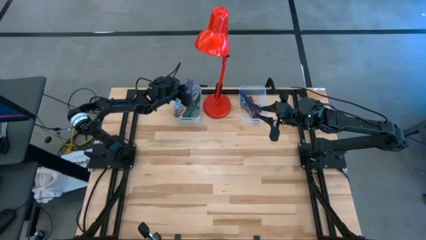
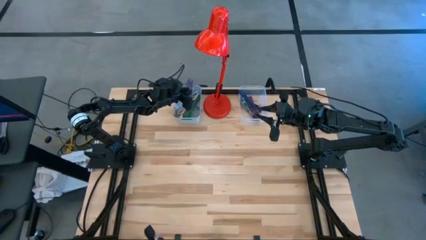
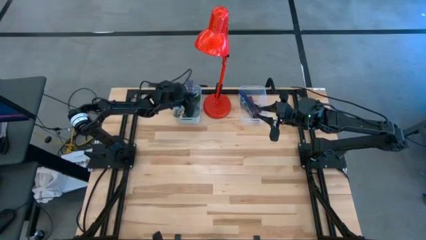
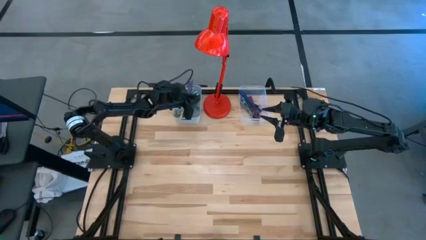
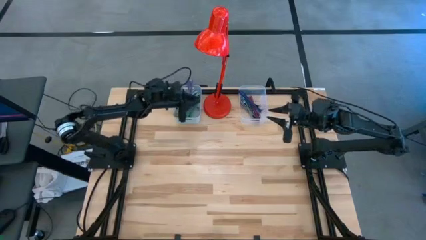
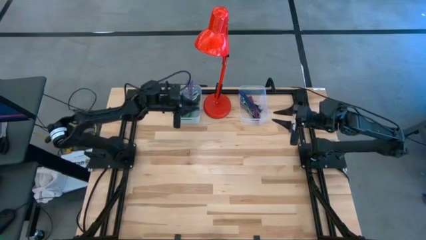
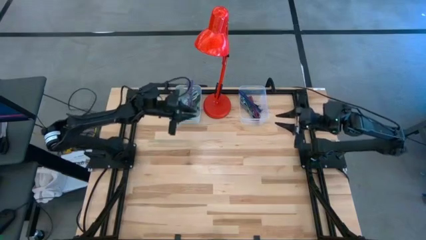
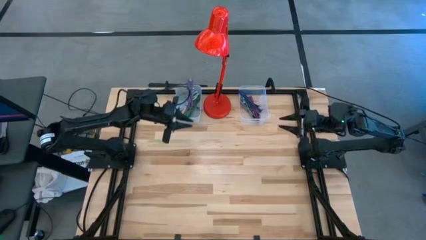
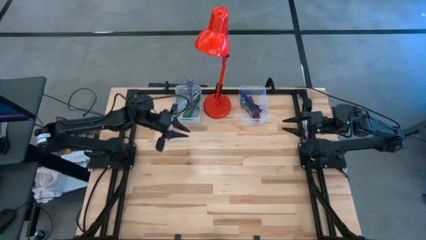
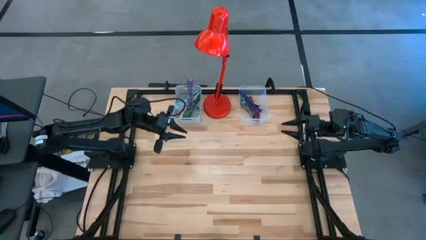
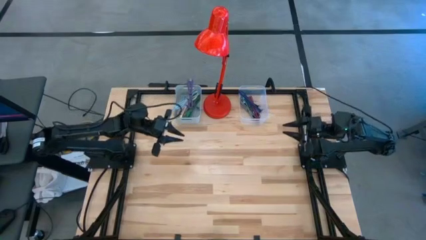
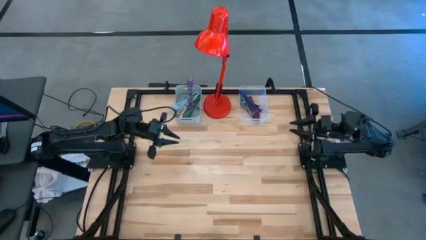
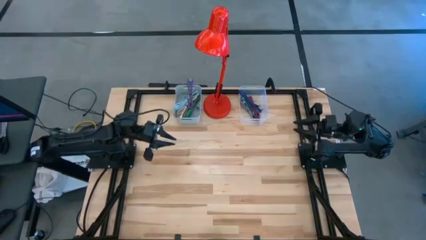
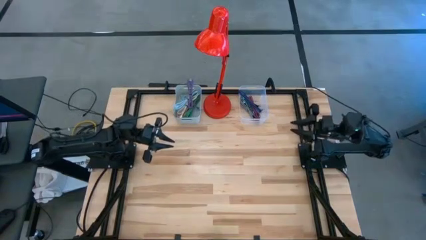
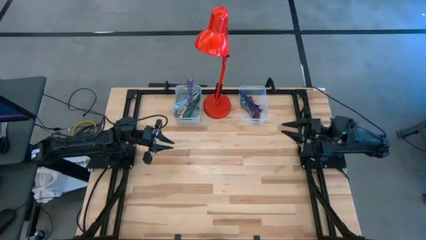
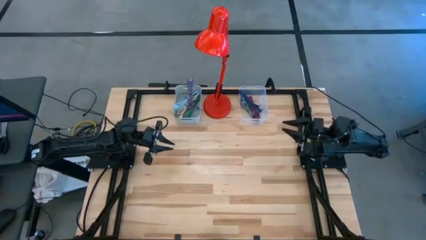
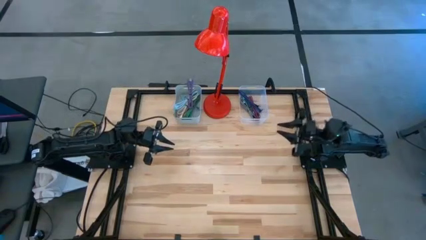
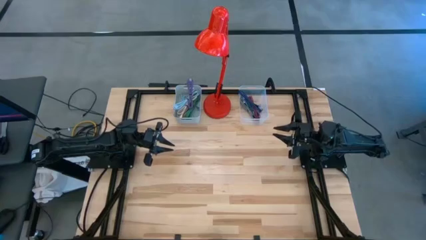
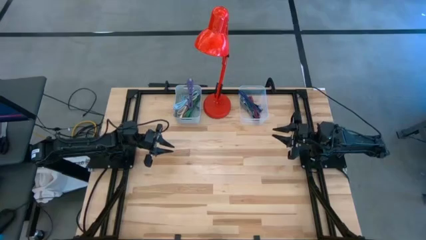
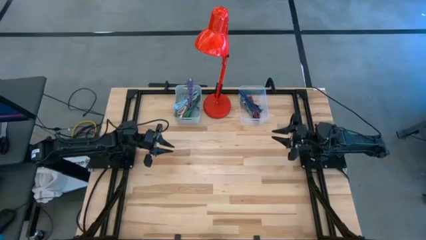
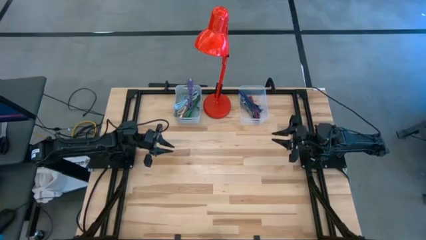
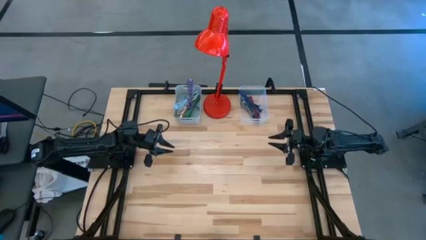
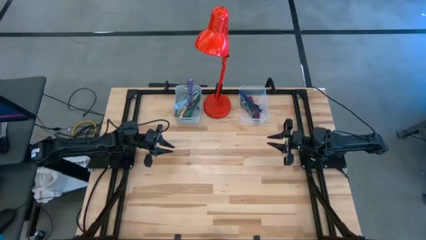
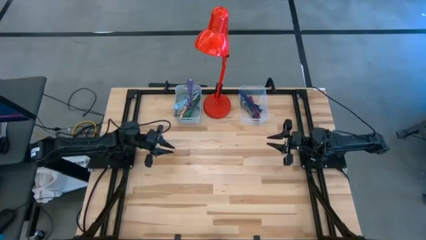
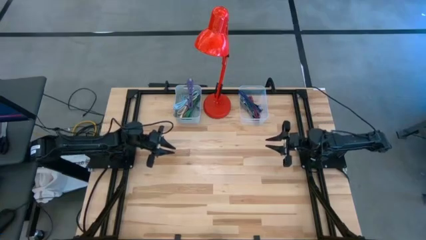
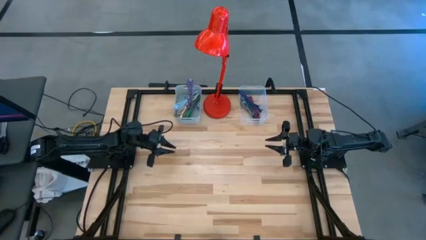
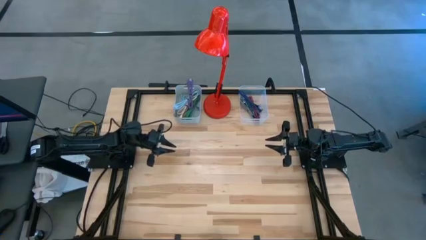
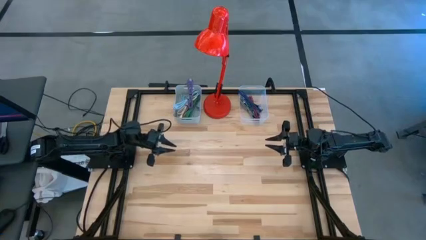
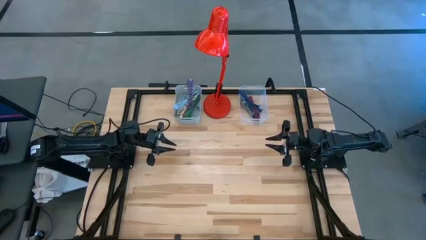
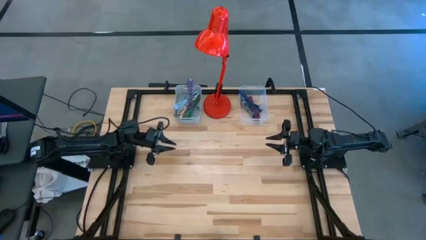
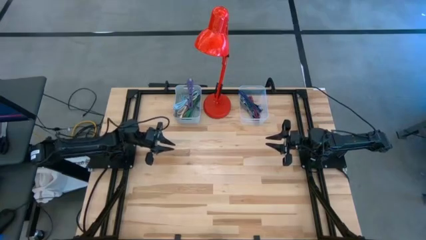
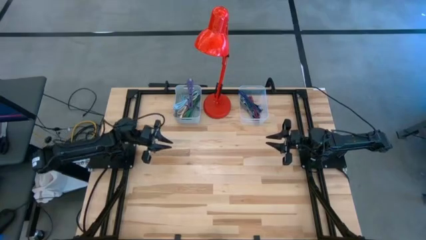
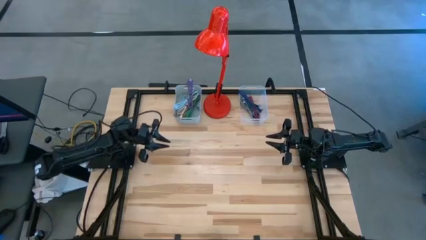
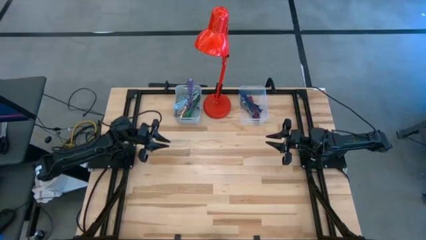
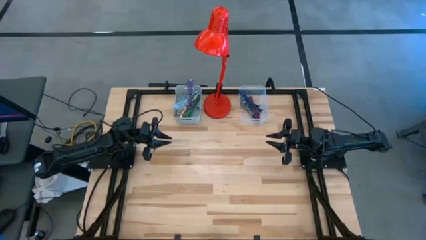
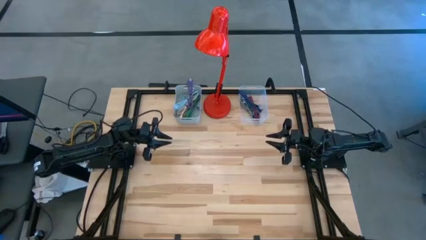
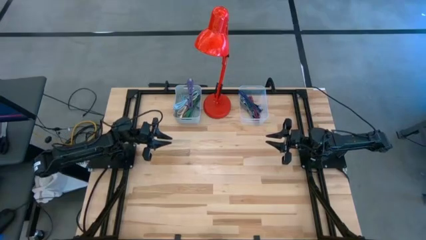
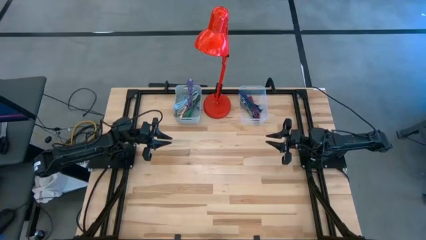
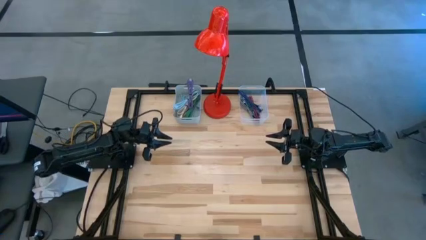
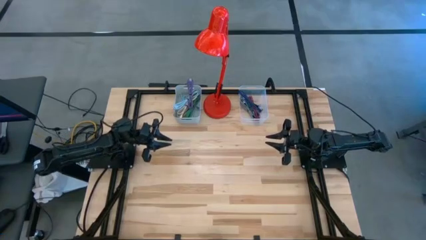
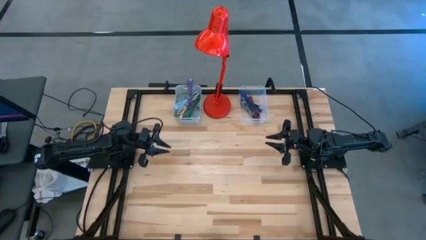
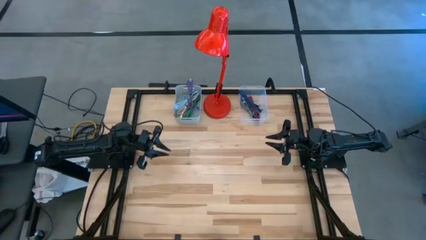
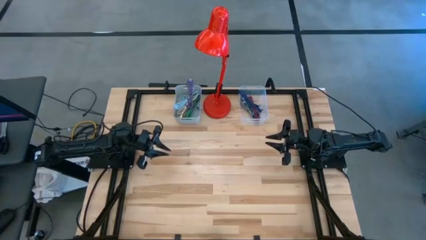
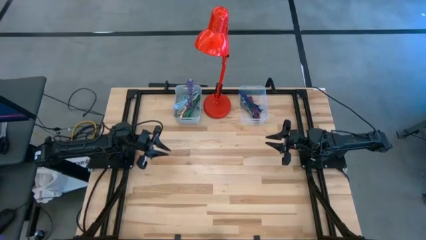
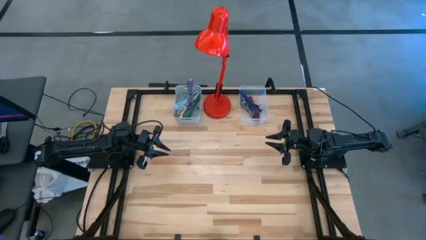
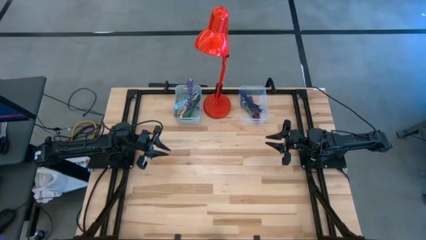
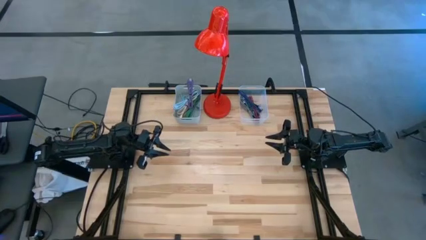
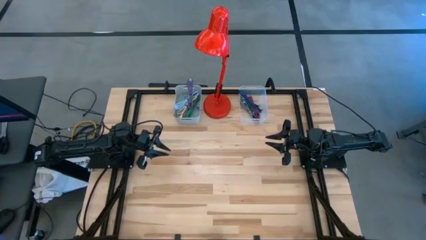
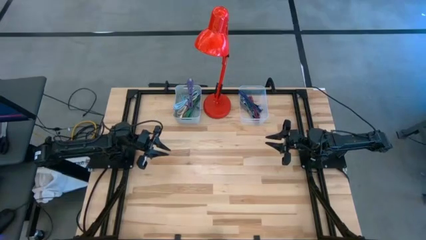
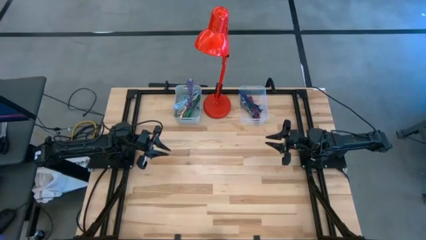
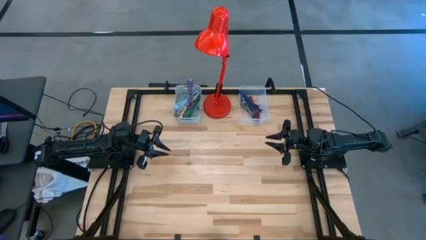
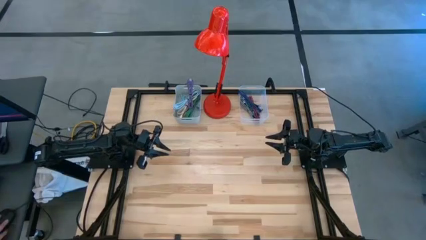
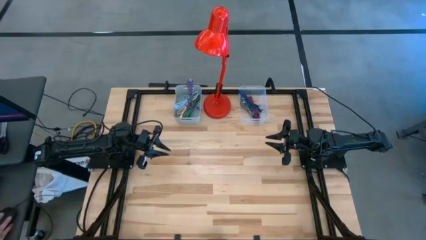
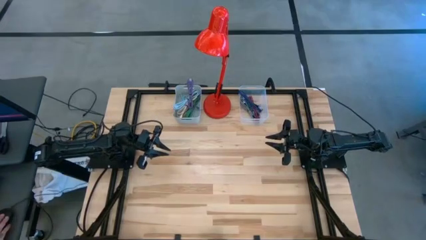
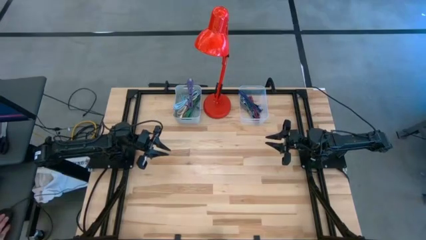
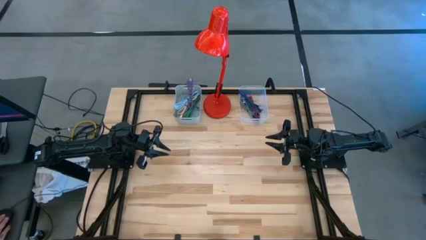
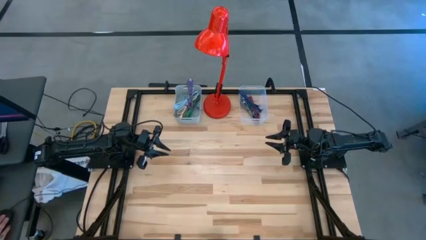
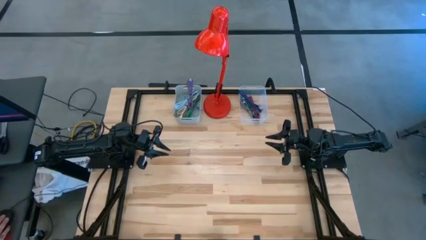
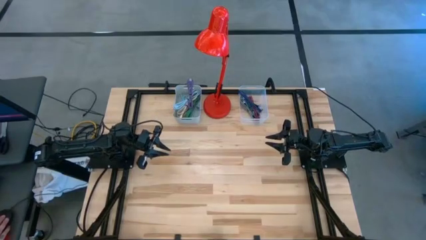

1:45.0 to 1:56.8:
Task: Pick & Place USB Port
Return to Home Position

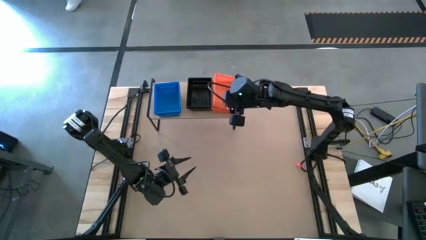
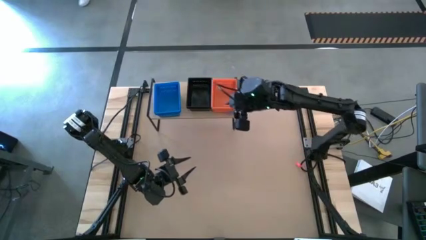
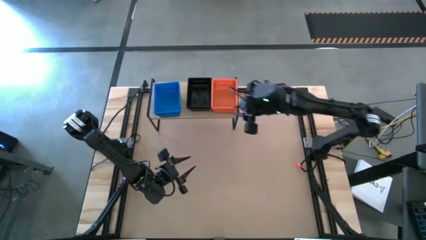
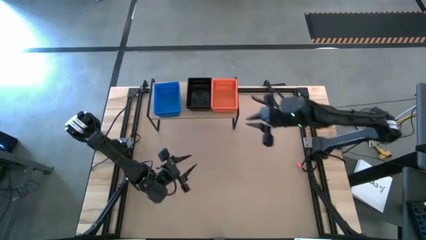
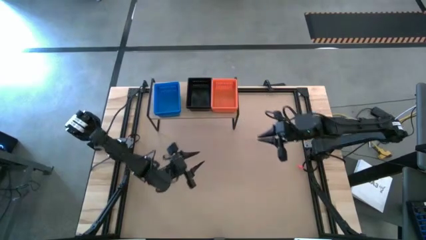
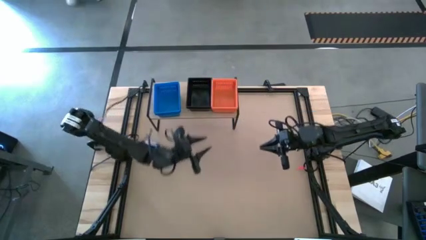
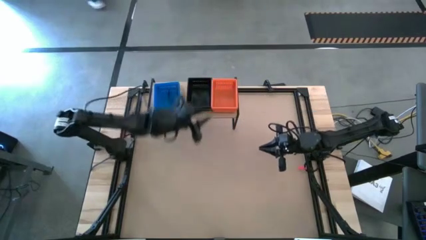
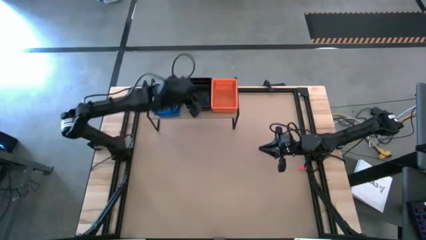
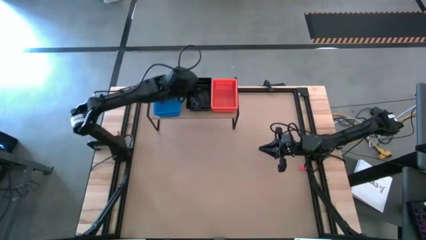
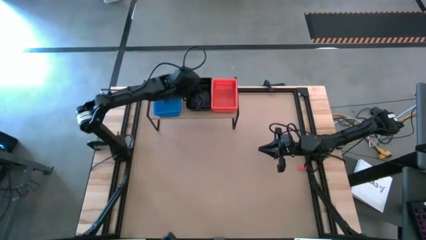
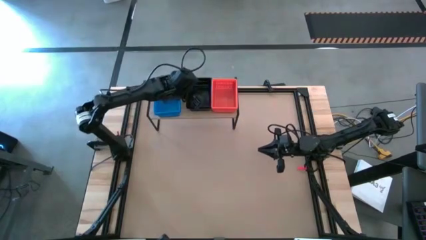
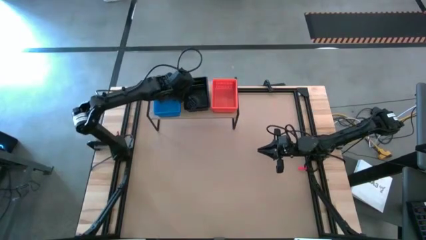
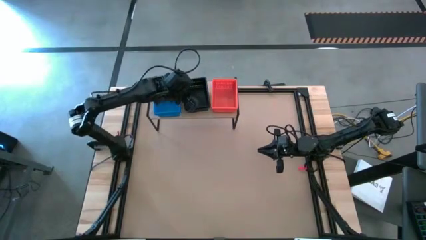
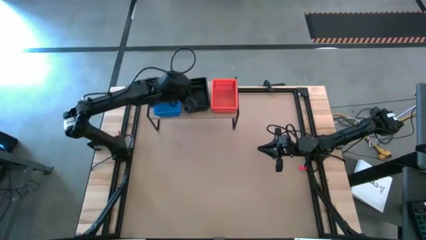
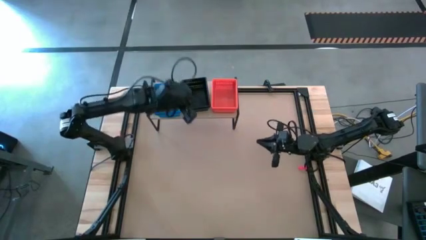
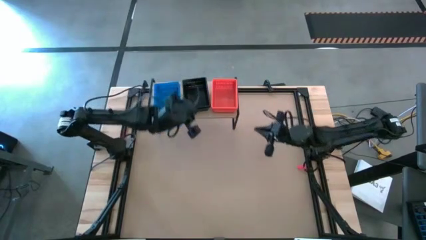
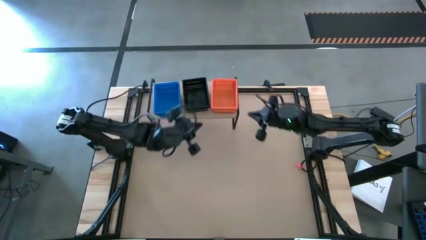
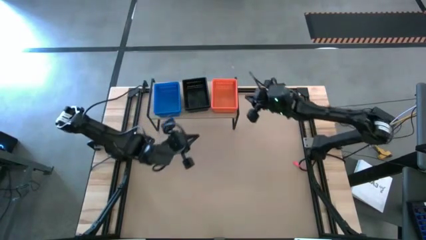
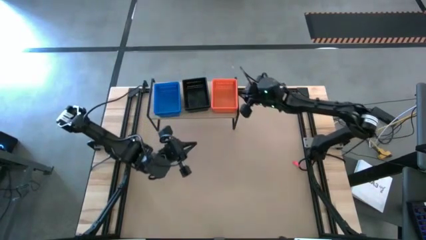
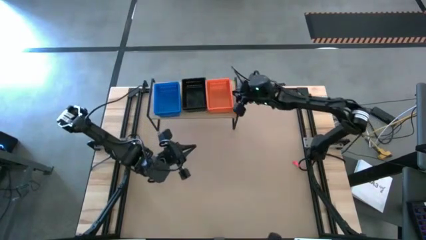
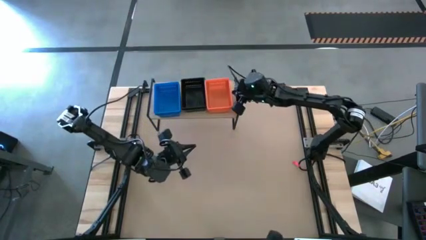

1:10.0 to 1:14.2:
Task: Stack baskets on shelf by color
Adjust the bins on the shelf
